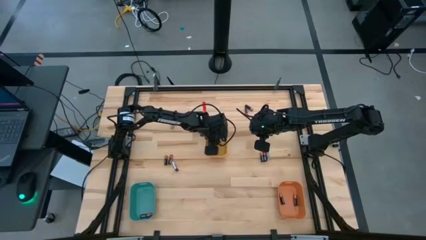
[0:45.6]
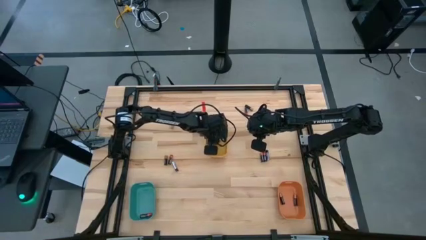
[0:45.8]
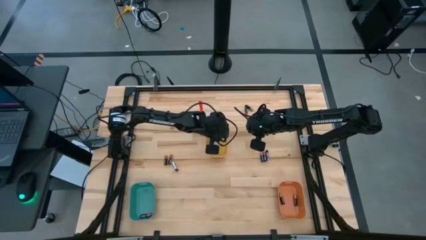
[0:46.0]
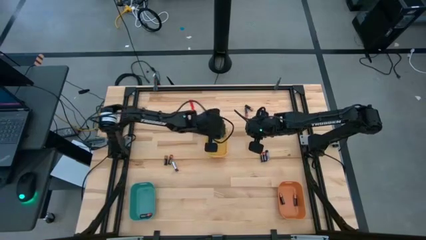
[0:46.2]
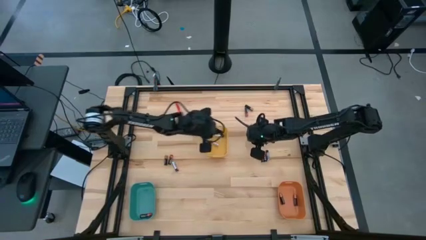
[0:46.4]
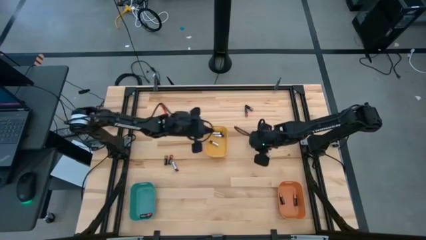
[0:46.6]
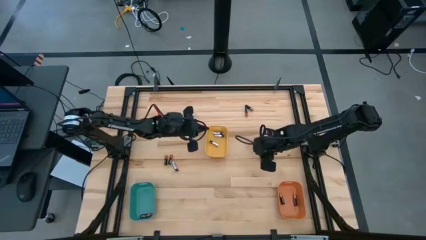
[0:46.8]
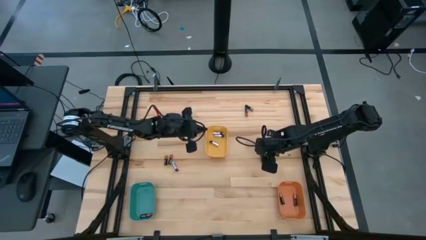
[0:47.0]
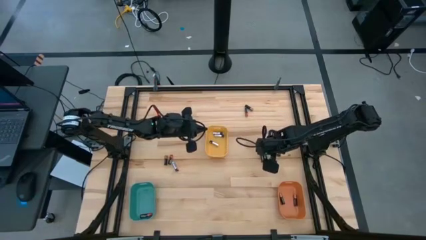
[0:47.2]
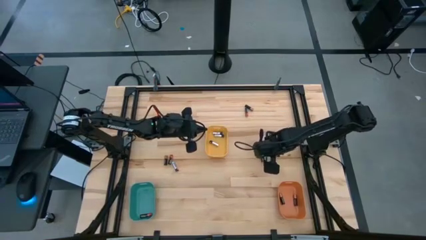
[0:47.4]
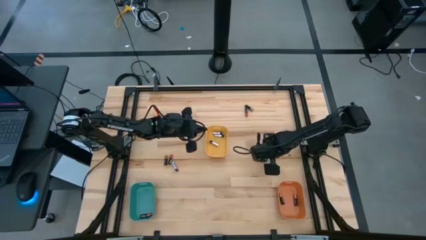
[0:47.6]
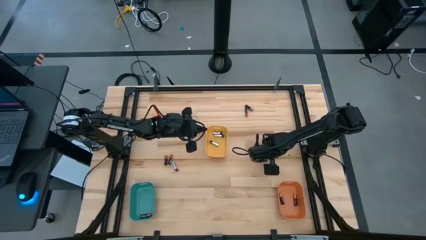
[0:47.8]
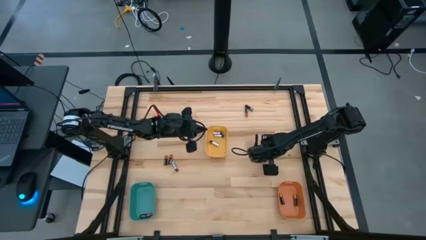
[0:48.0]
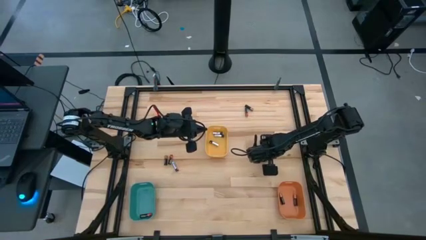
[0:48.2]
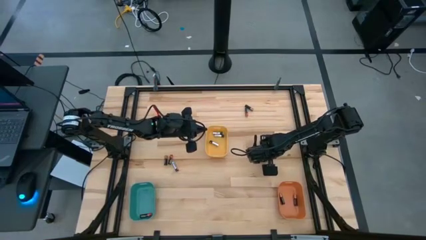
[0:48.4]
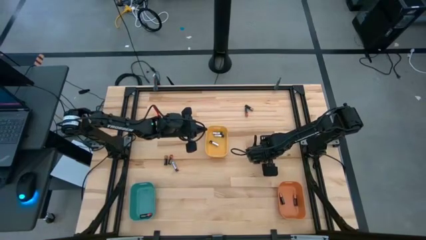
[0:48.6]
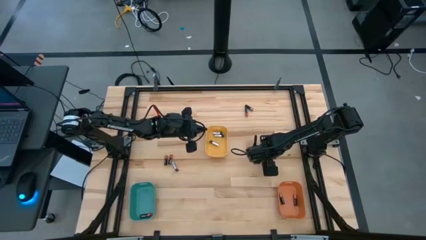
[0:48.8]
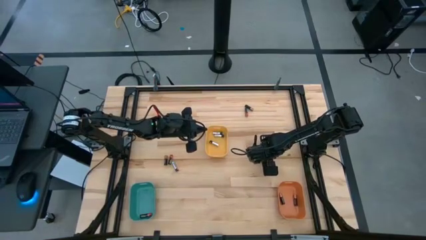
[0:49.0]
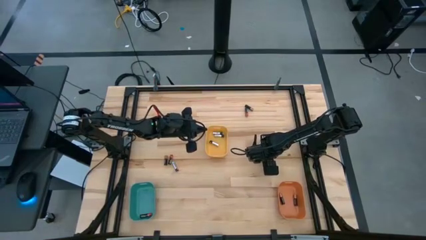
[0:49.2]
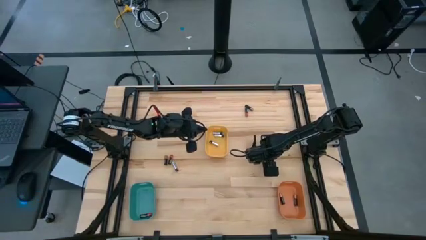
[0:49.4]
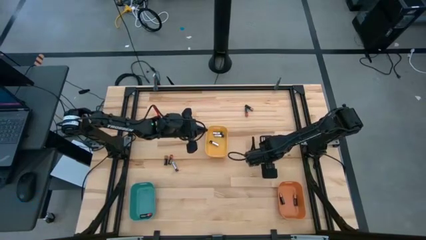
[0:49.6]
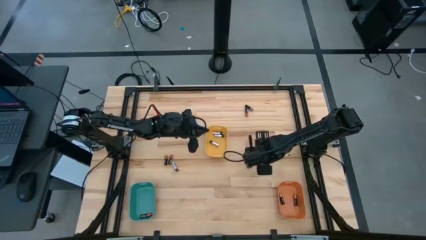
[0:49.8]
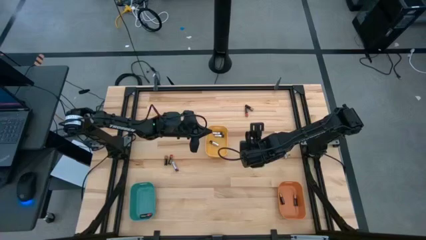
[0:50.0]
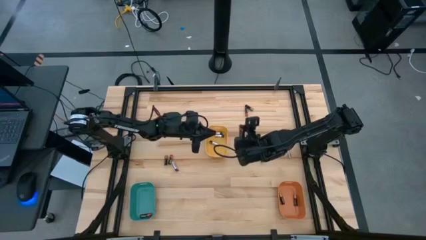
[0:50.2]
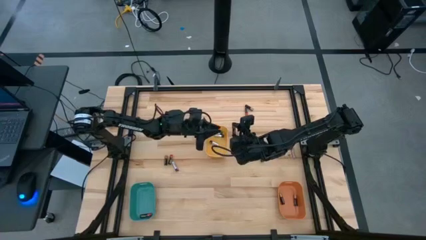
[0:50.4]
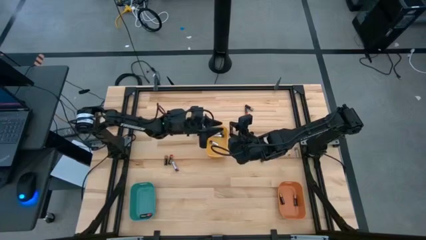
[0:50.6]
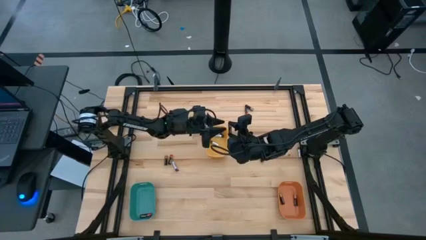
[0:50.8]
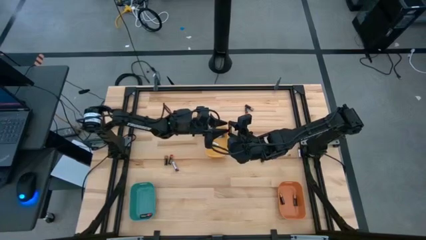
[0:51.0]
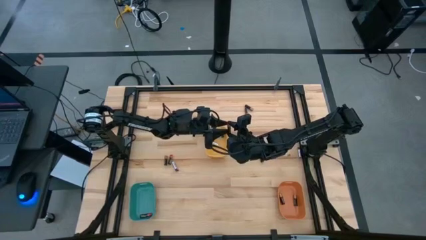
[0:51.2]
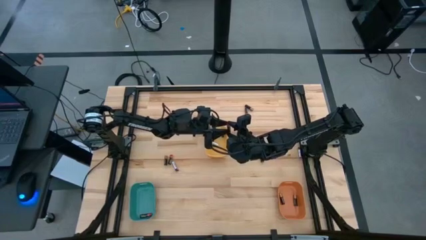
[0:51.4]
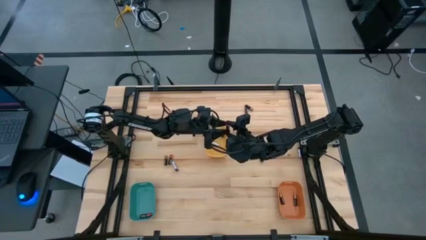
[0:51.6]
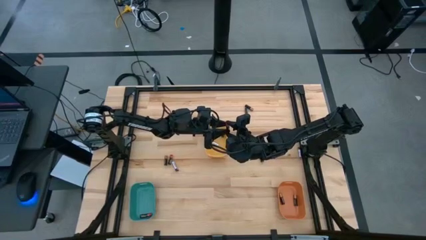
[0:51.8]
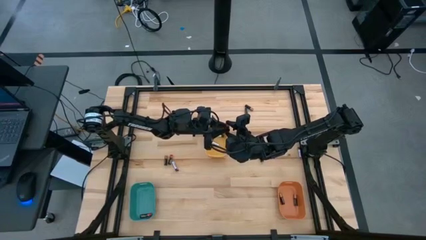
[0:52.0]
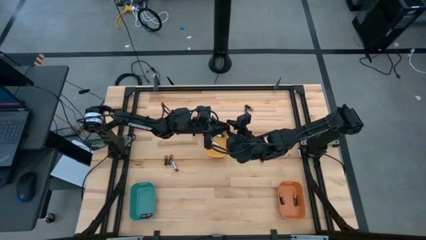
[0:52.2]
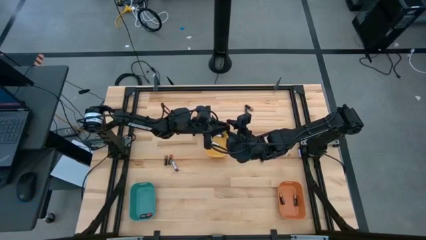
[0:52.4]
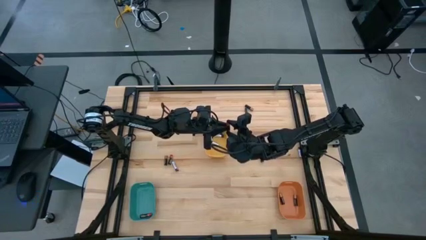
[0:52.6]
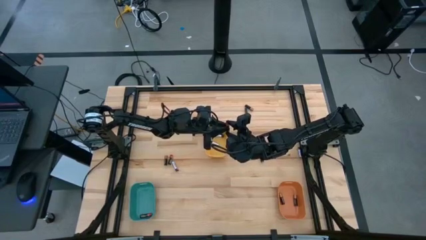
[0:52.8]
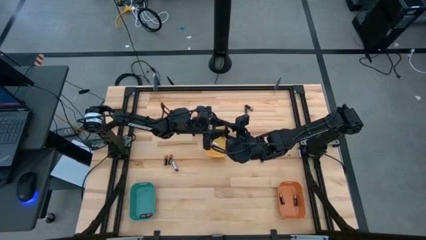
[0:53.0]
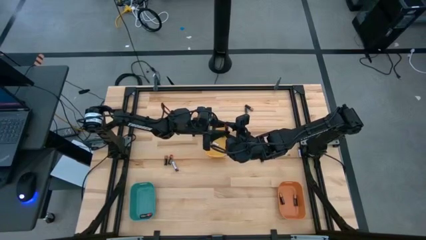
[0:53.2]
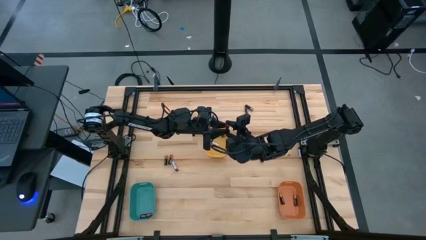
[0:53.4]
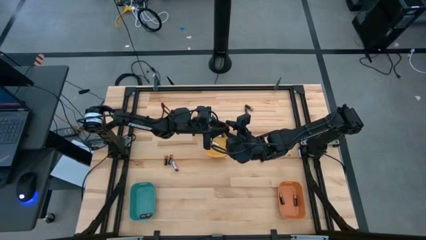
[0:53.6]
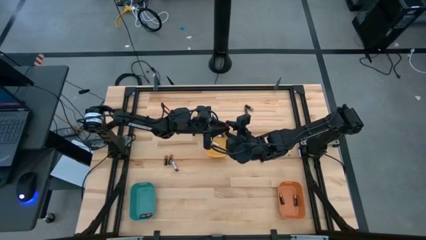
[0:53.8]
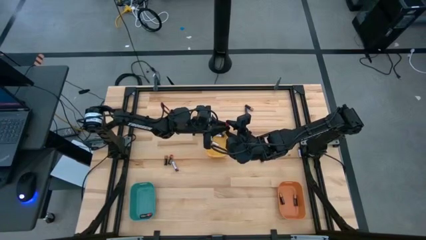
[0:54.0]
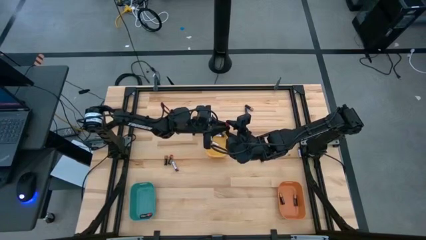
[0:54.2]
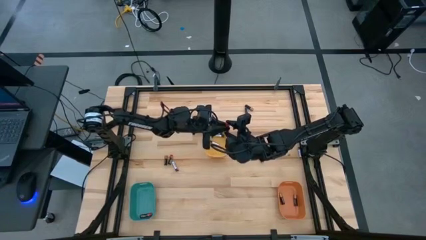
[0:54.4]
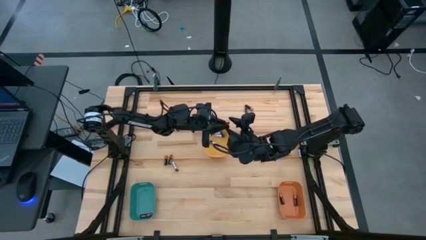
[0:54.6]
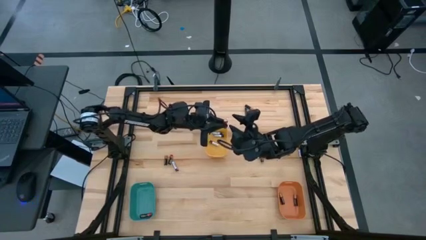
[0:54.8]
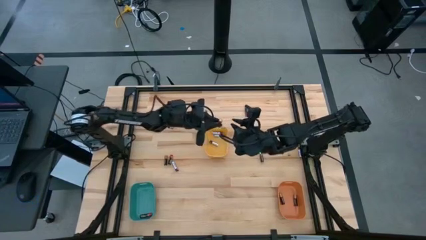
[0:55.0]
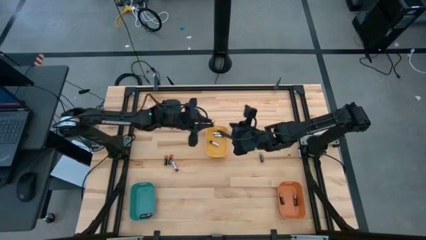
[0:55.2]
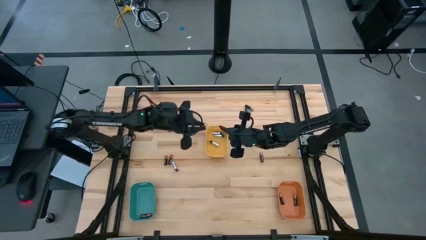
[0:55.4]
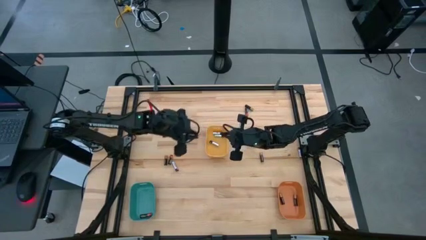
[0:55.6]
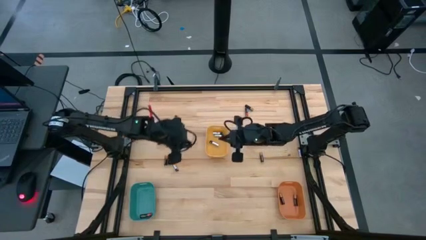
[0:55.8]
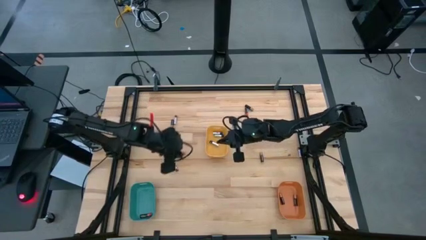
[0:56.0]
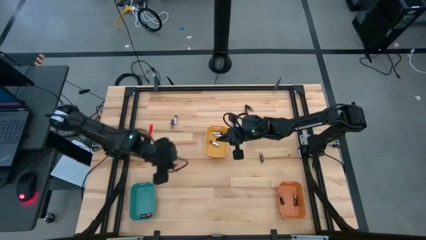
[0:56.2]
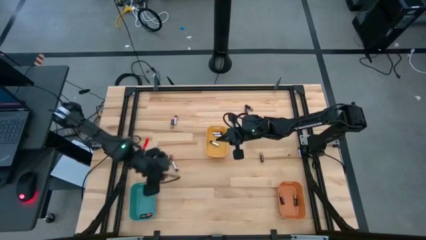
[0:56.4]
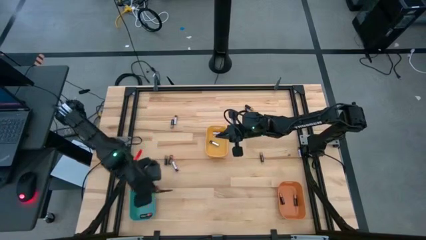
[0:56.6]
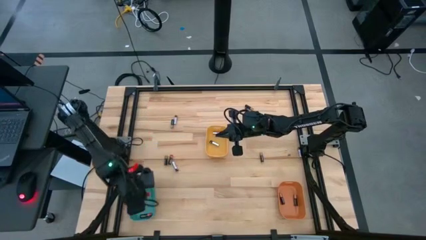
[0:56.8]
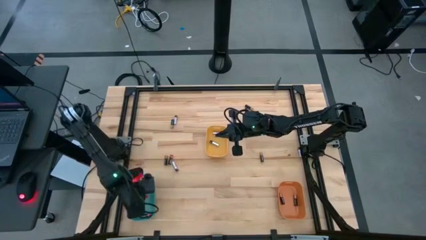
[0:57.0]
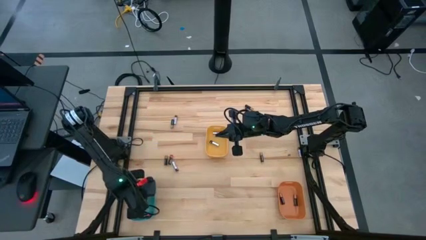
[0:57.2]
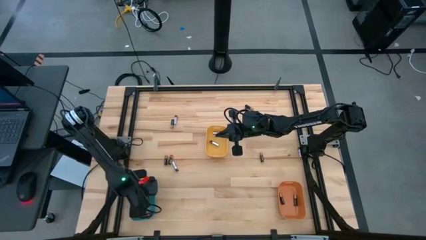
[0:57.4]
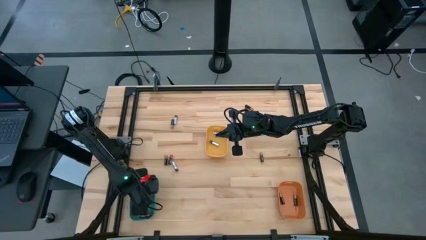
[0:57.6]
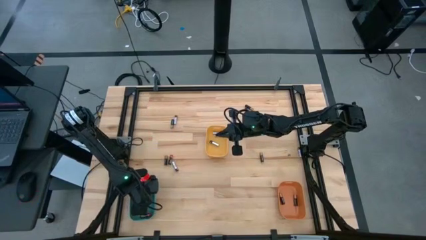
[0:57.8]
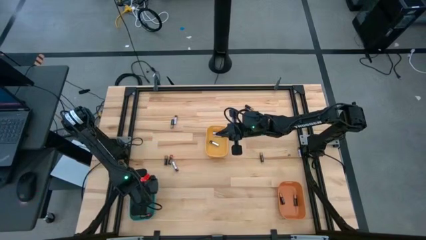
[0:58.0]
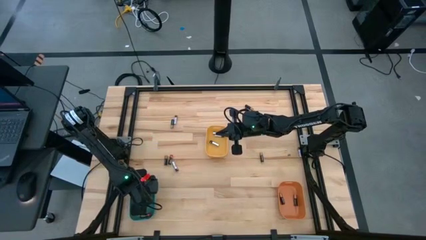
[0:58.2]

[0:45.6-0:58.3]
Task: Sort batteries
Put the red battery into the blue bin

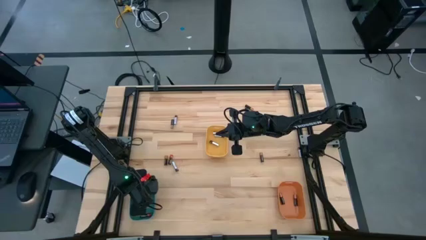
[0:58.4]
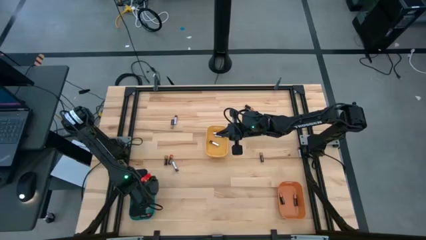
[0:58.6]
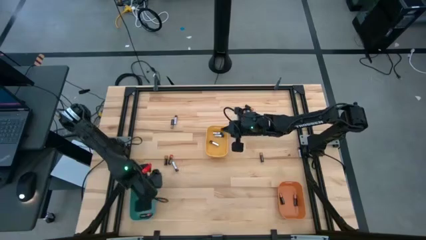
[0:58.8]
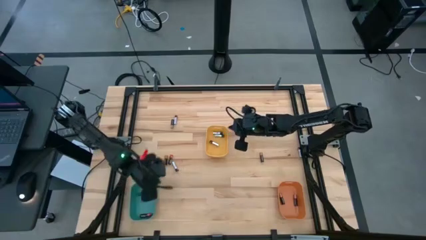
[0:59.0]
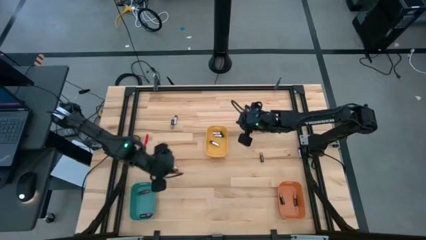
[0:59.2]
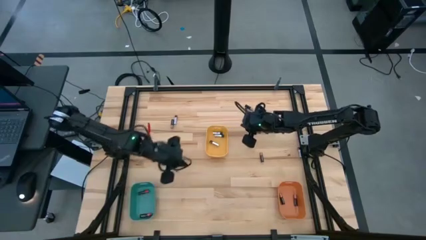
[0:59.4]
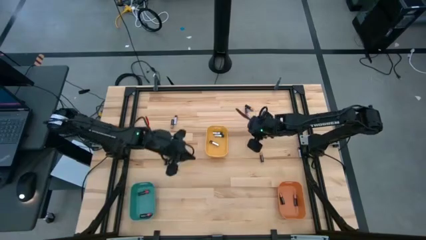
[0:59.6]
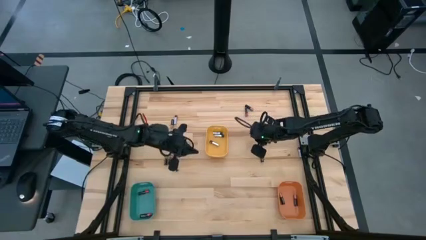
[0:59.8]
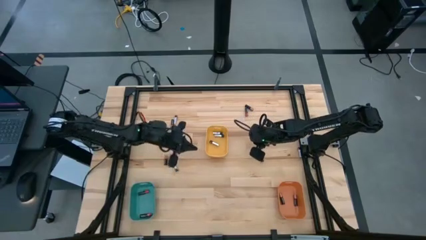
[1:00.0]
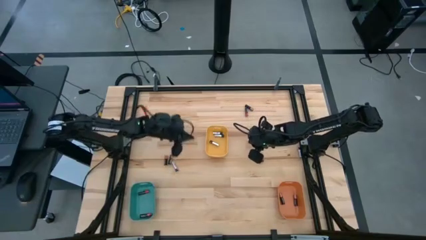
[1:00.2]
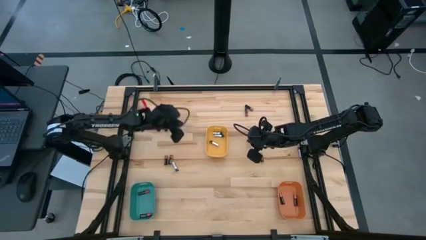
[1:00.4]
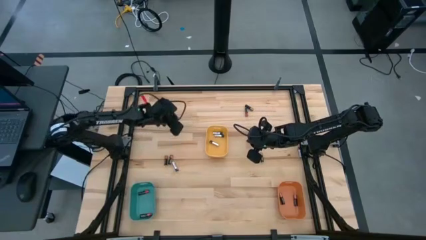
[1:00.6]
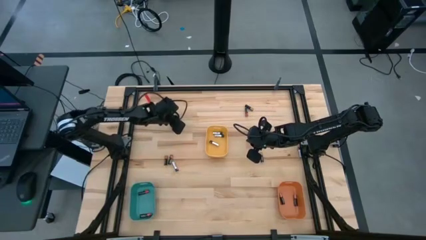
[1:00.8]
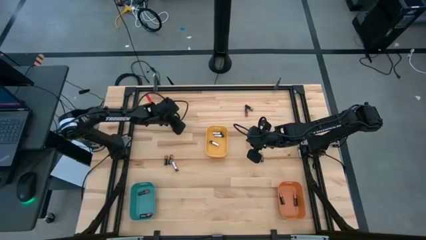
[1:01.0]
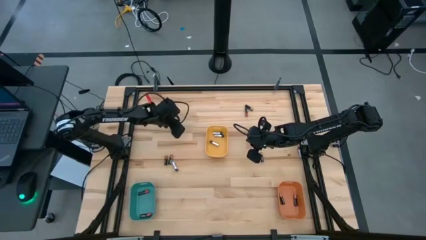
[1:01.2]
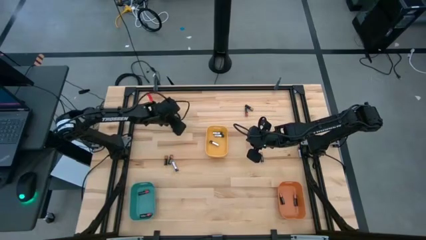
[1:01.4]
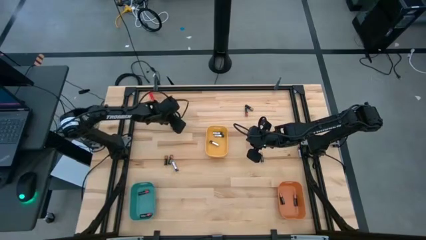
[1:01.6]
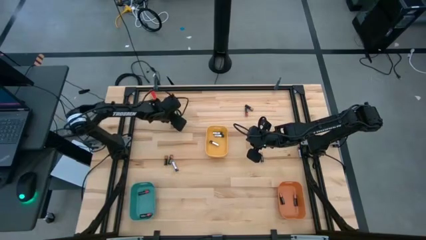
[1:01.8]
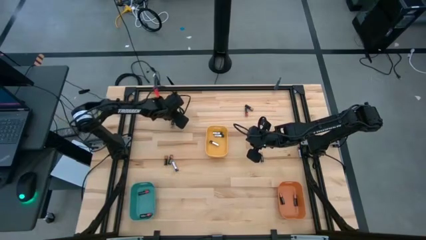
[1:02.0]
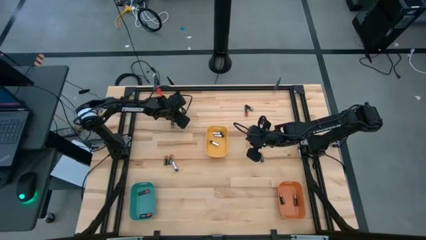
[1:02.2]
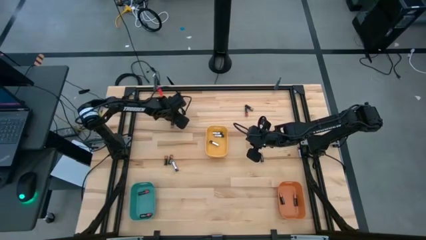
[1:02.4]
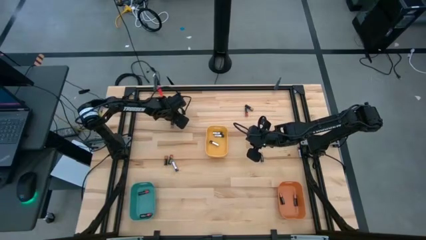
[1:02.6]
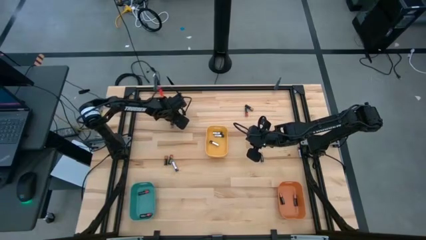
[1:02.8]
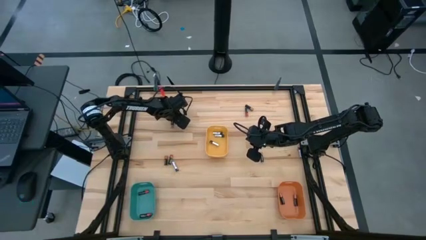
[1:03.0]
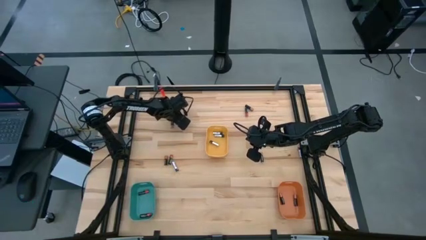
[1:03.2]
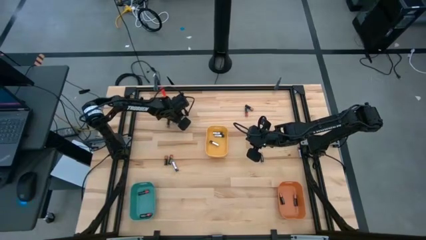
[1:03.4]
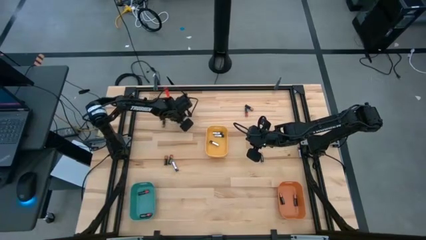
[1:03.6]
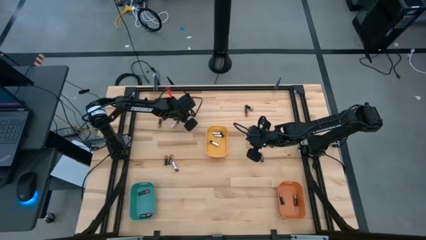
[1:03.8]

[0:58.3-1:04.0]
Put the silver battery into the yellow bin
